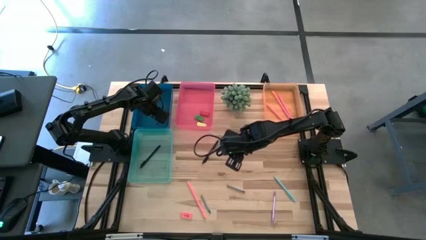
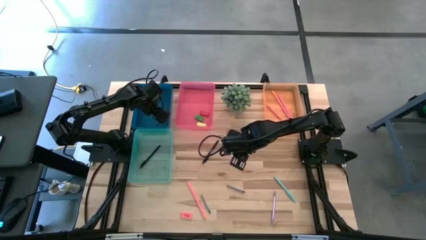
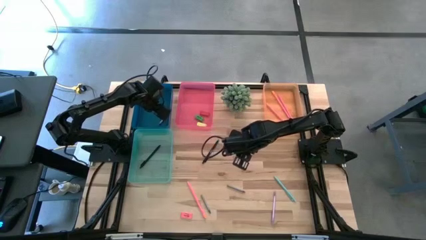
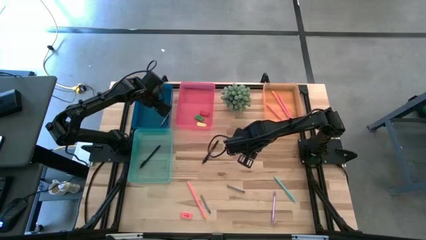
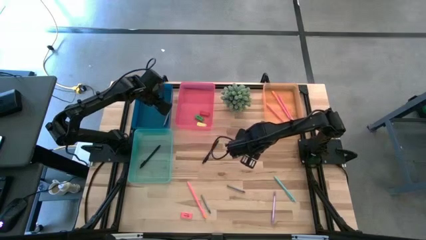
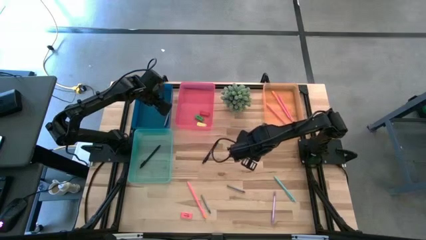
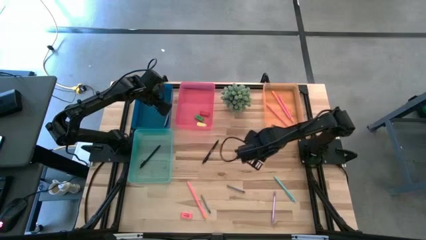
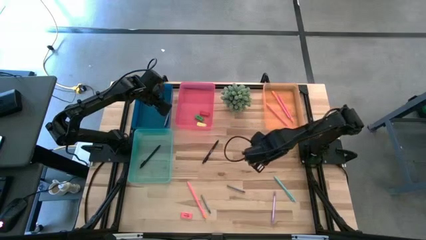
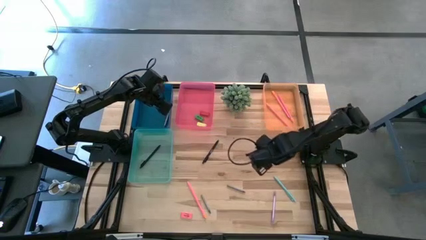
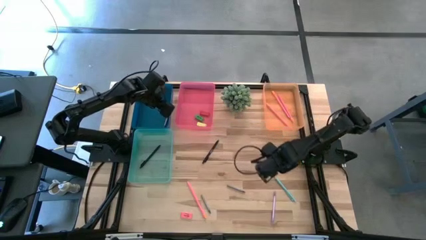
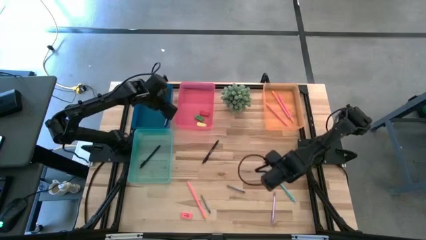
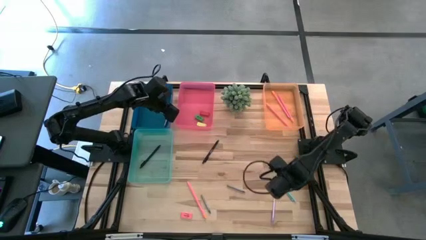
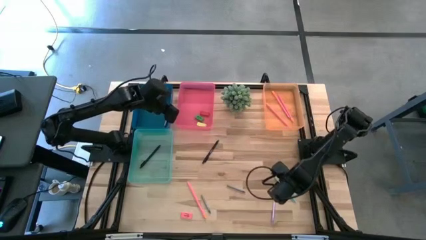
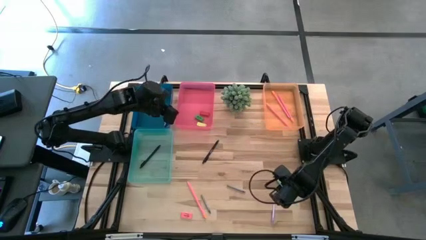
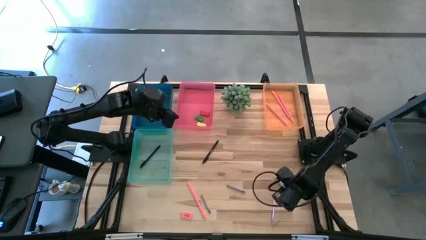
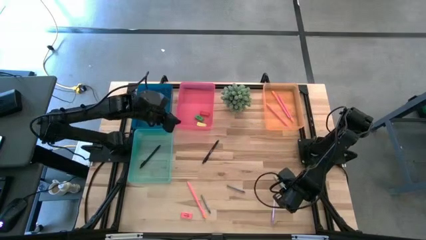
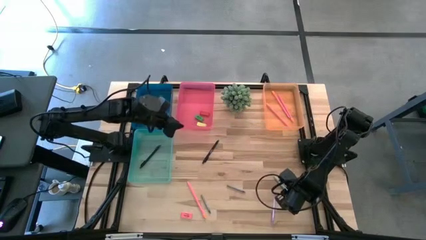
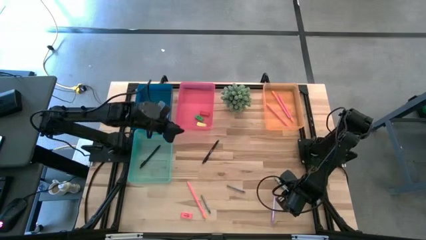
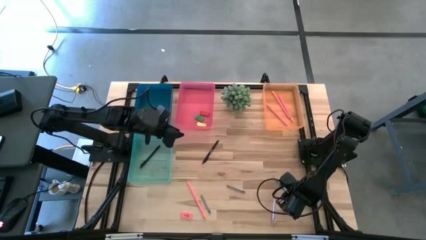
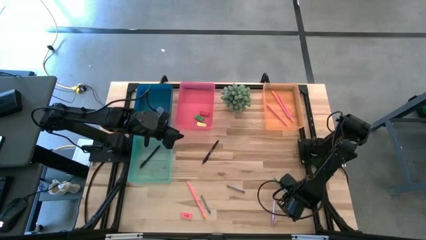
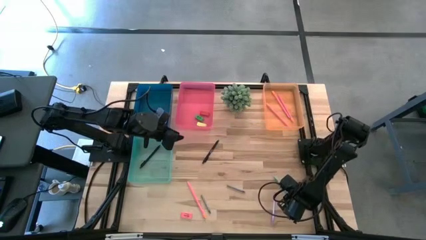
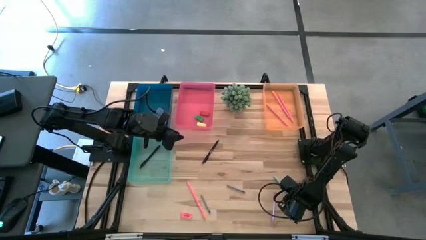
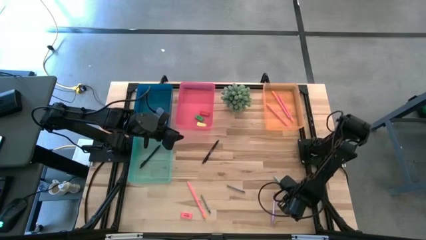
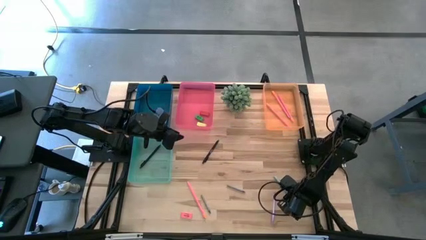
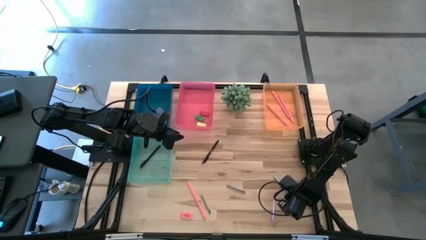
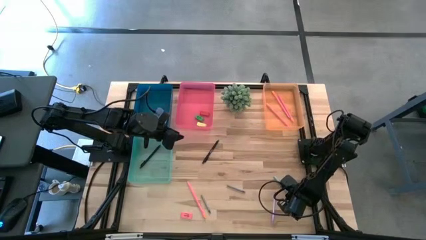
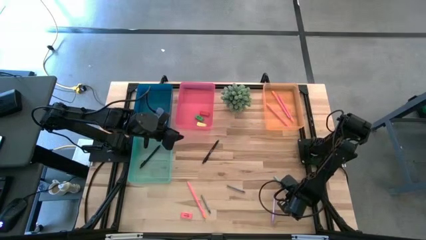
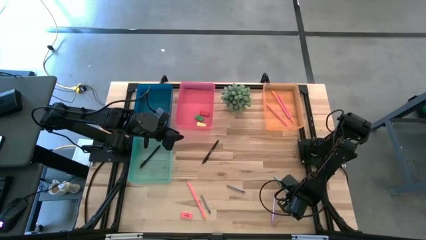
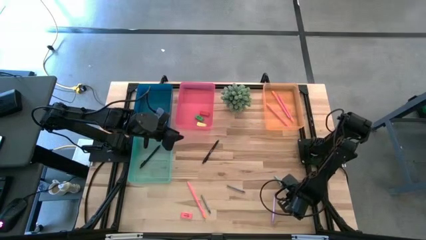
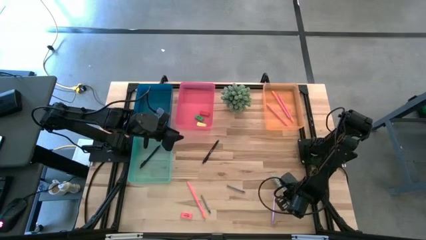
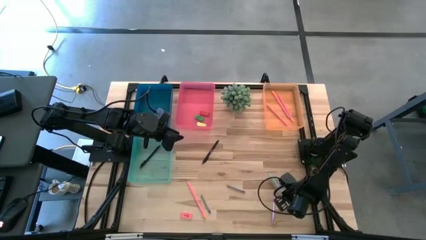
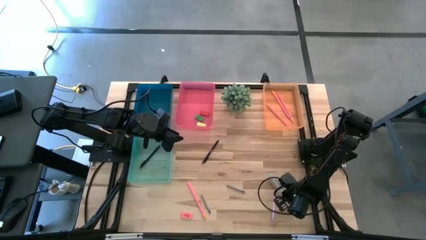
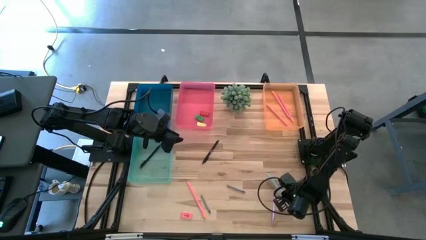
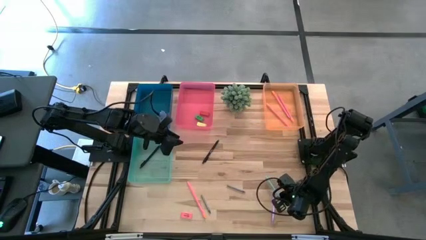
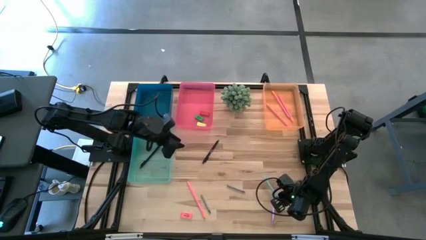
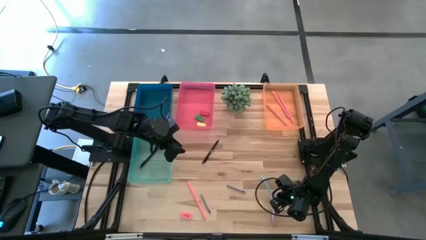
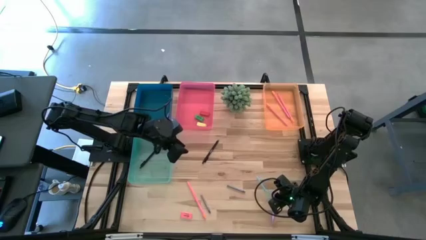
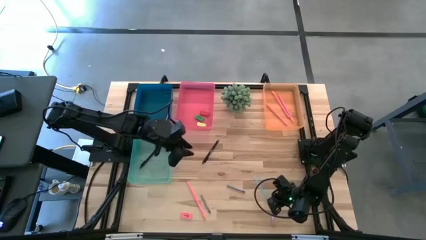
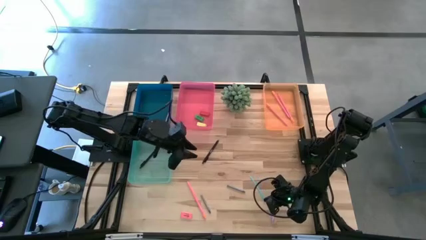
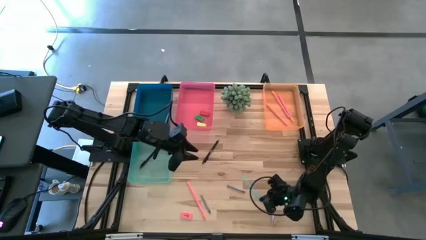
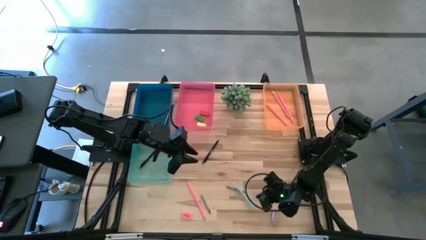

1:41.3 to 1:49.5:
Task: Sort crayons/erasers/pens/pencils in bins
Put the light blue pen into the light blue bin

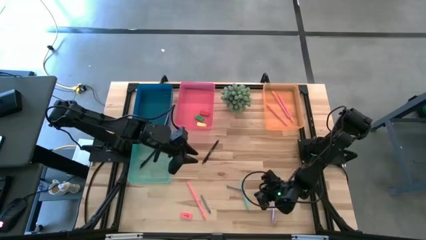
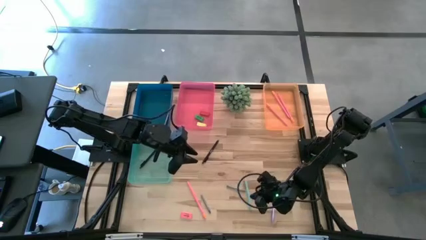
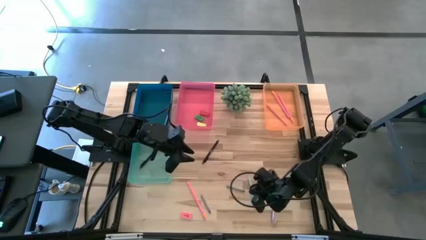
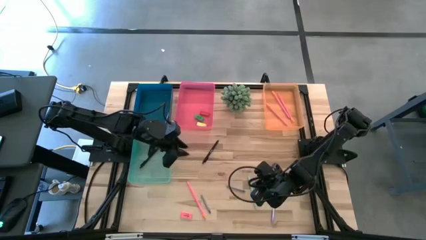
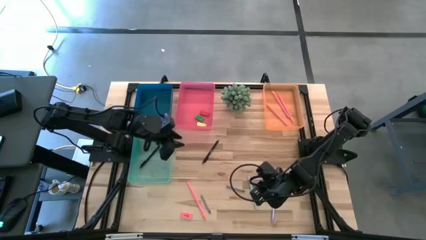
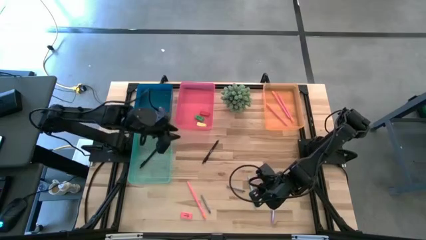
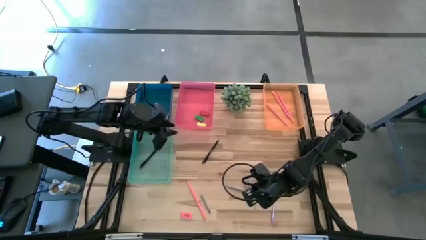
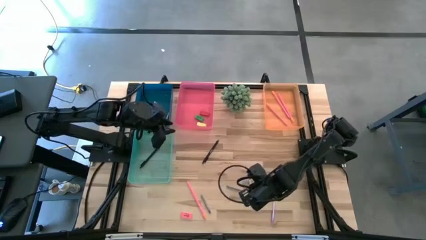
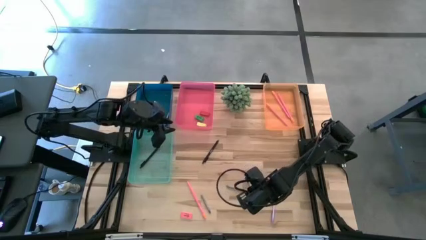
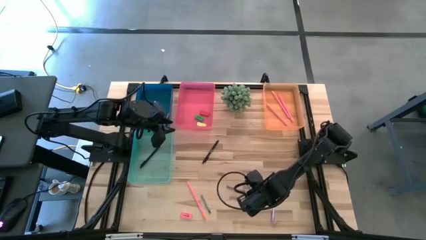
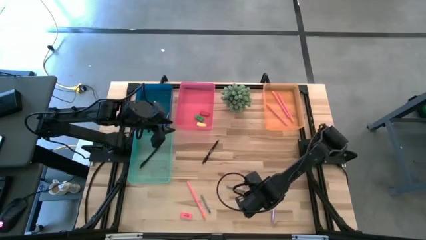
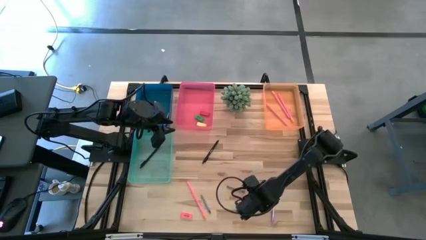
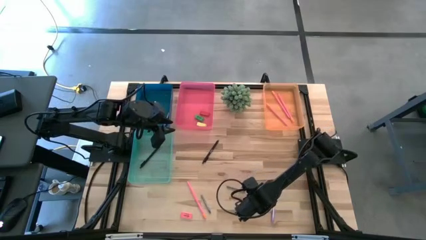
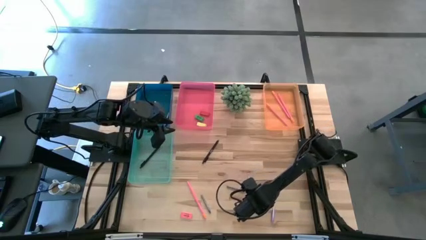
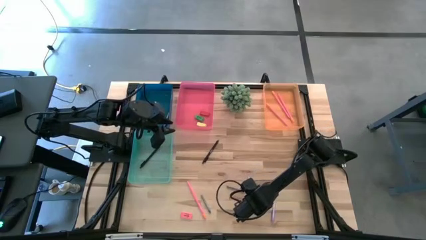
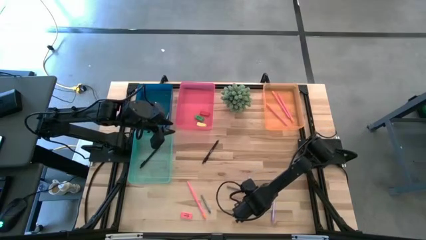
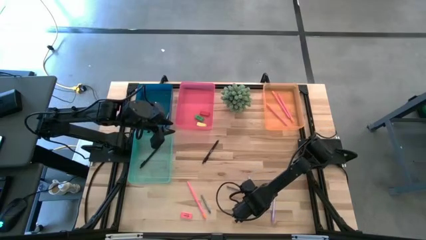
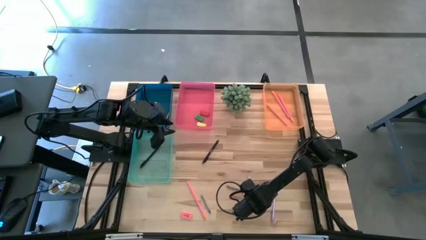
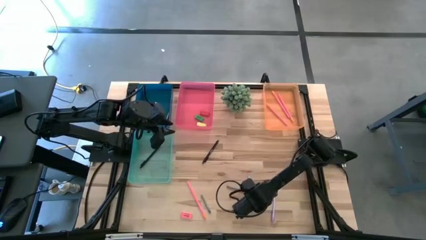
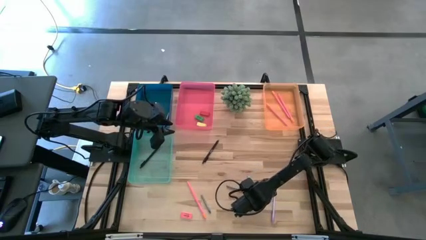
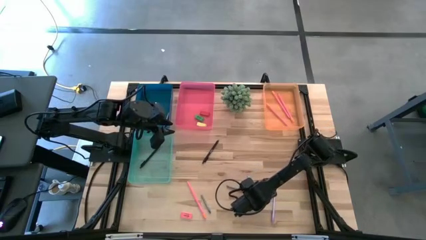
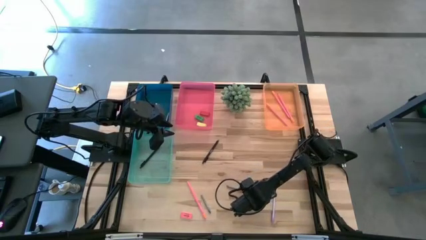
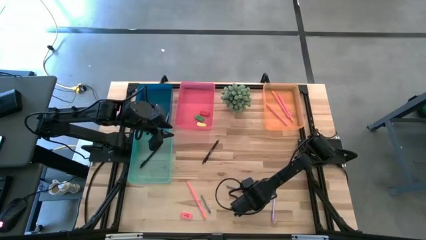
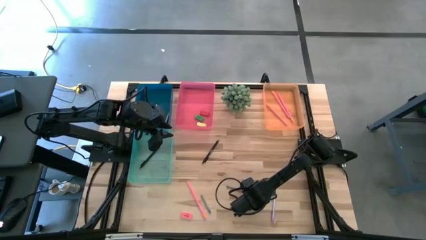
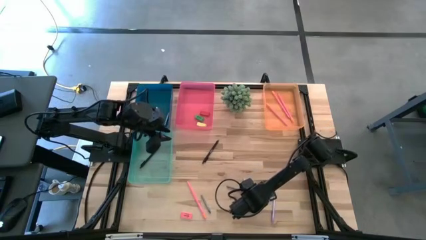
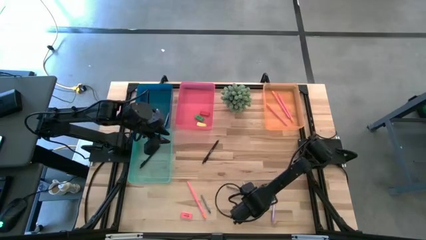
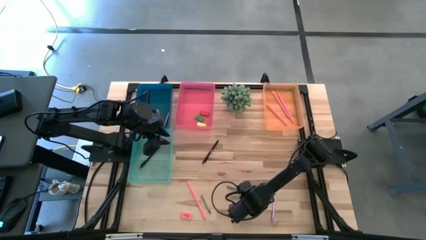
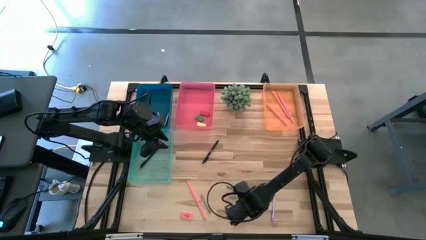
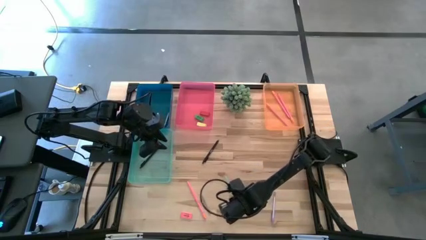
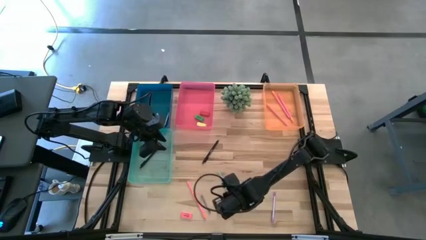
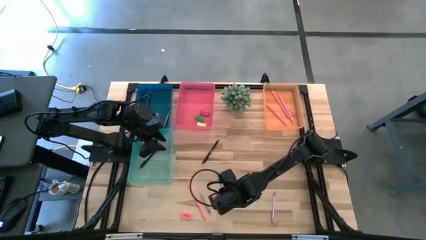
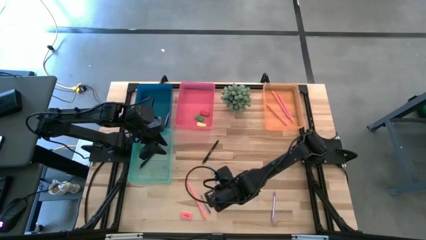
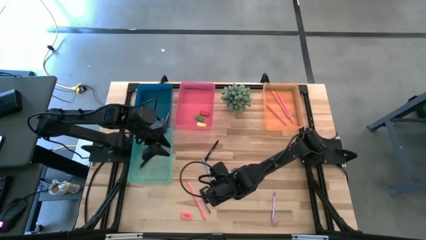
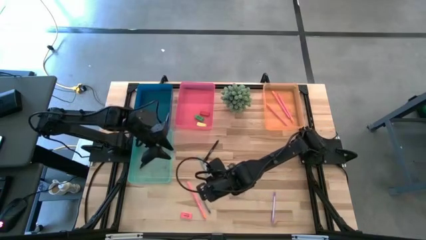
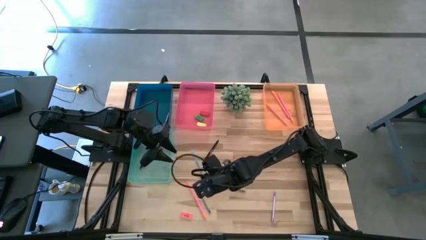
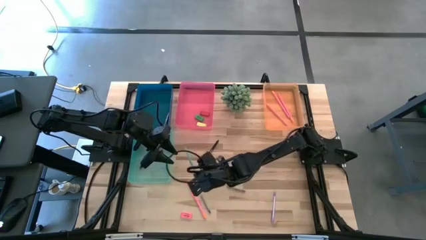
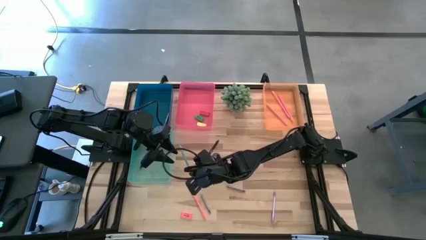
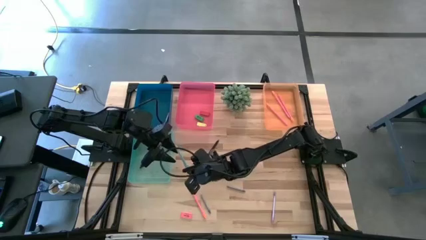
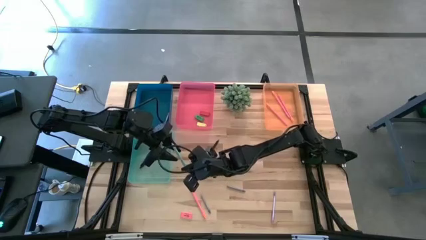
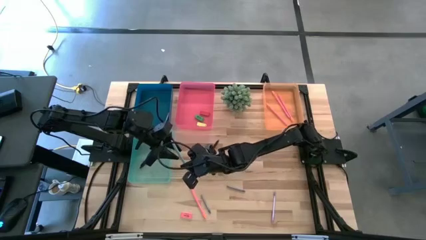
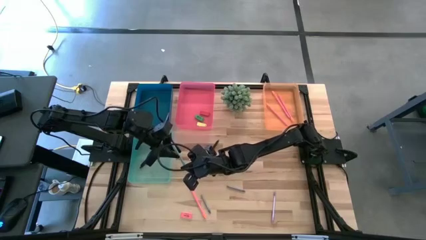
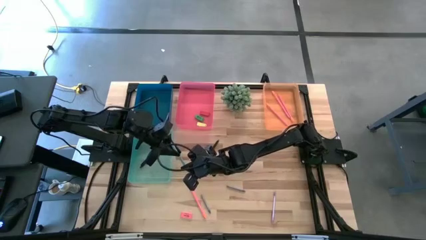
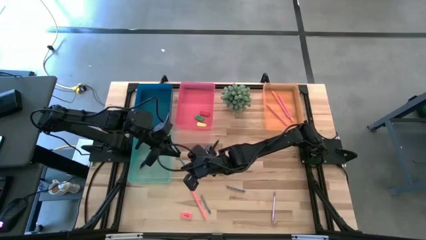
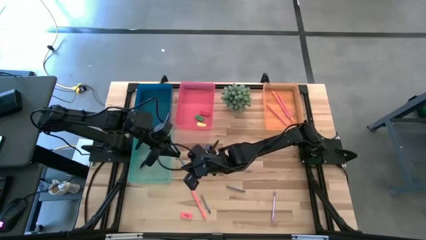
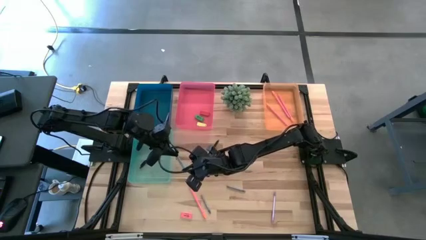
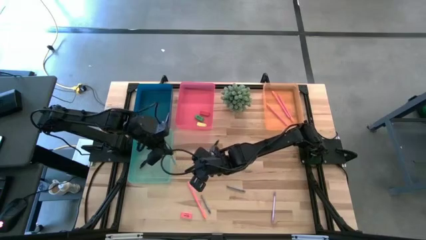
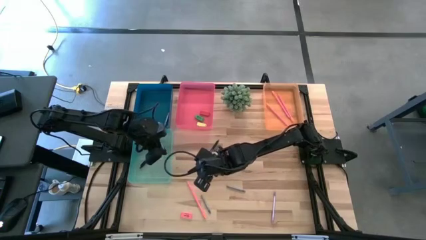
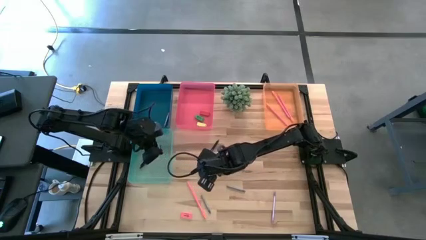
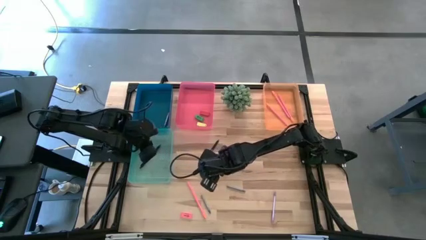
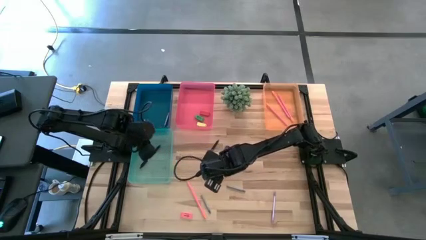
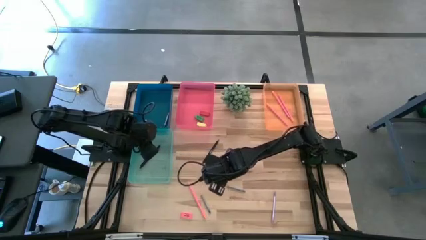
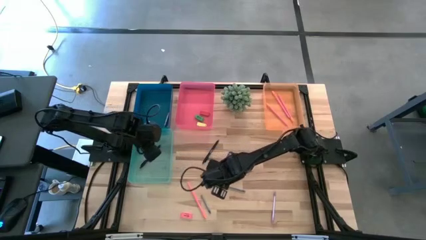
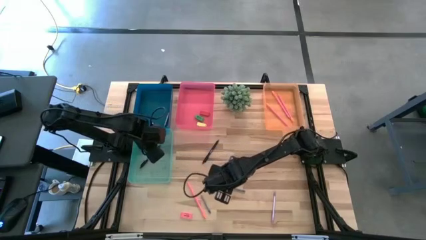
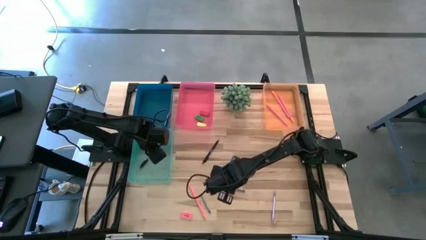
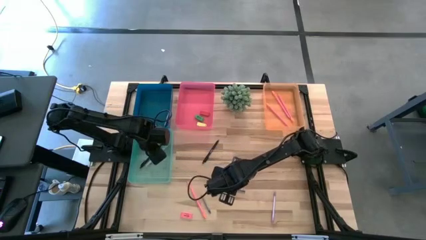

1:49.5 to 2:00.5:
Put the light blue pen into the light blue bin
